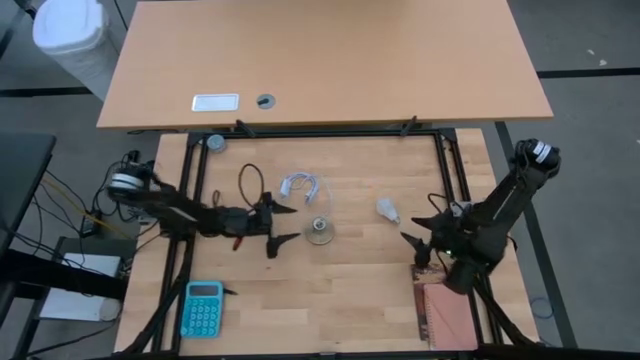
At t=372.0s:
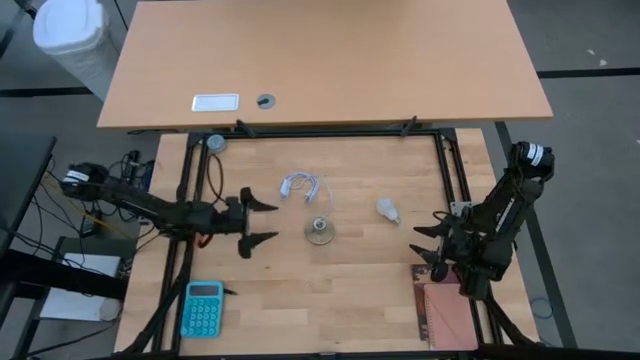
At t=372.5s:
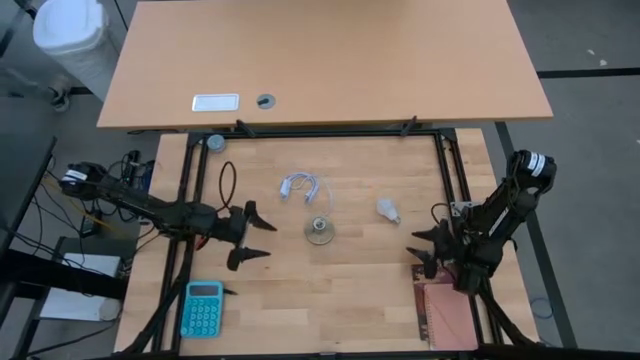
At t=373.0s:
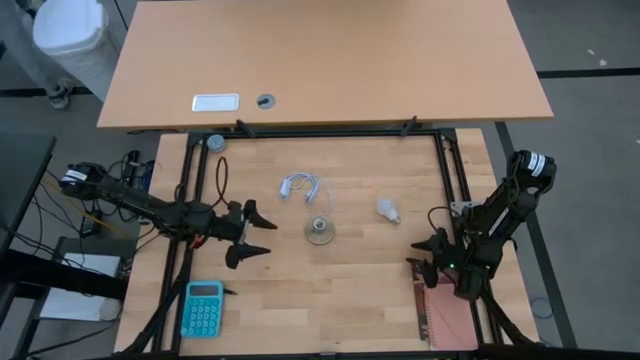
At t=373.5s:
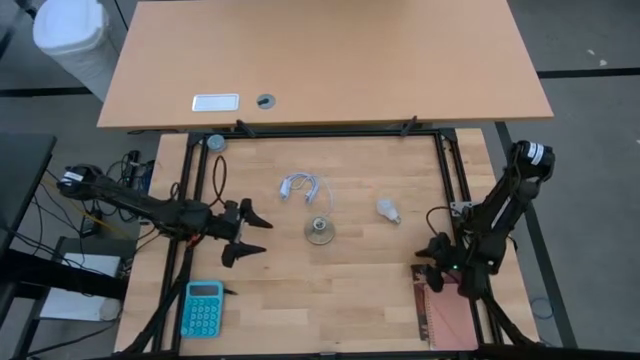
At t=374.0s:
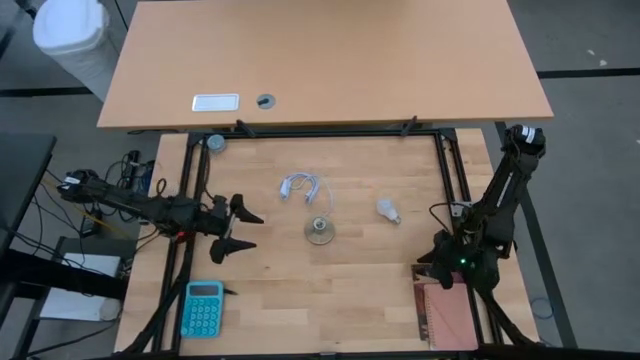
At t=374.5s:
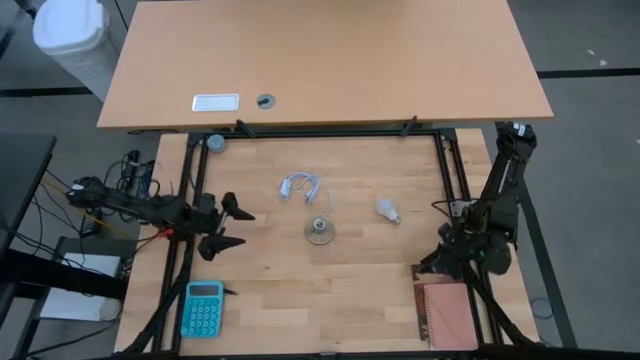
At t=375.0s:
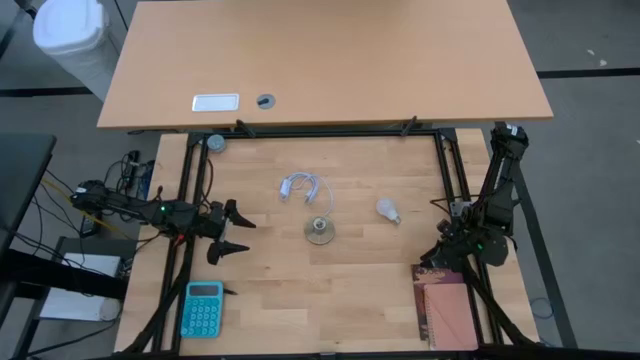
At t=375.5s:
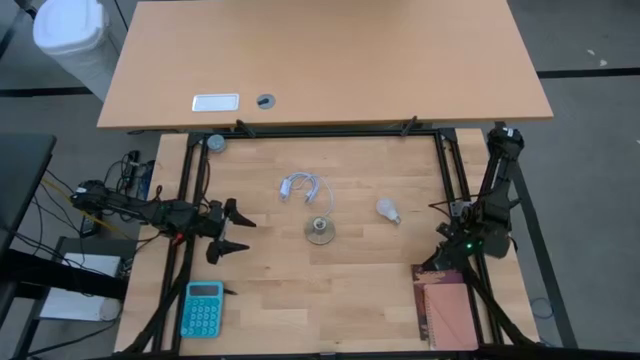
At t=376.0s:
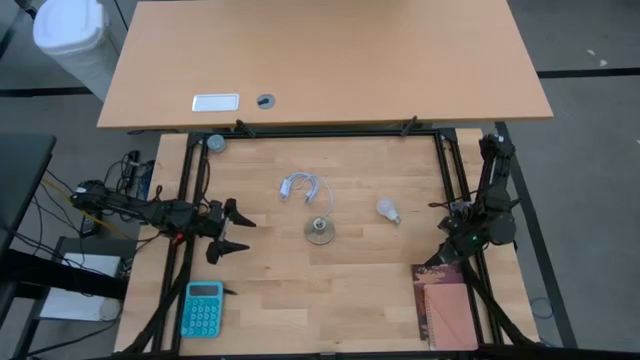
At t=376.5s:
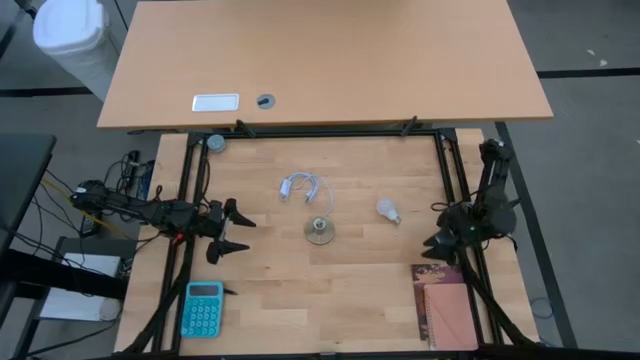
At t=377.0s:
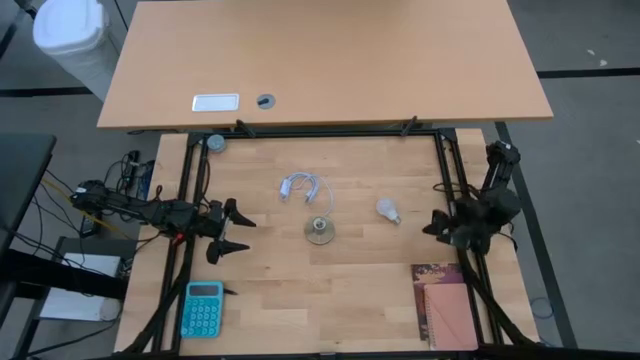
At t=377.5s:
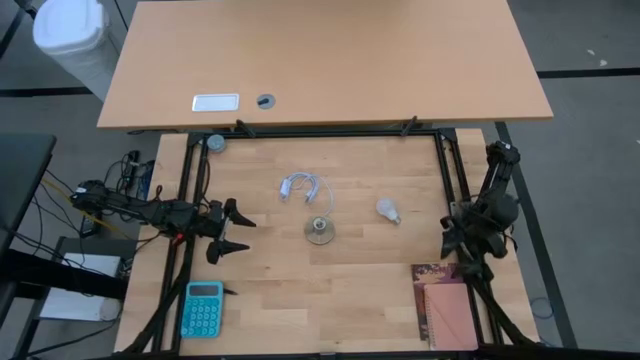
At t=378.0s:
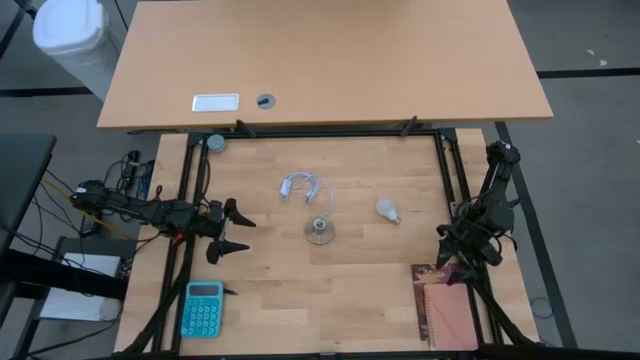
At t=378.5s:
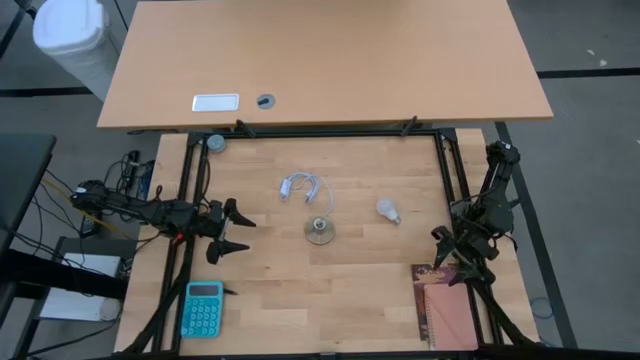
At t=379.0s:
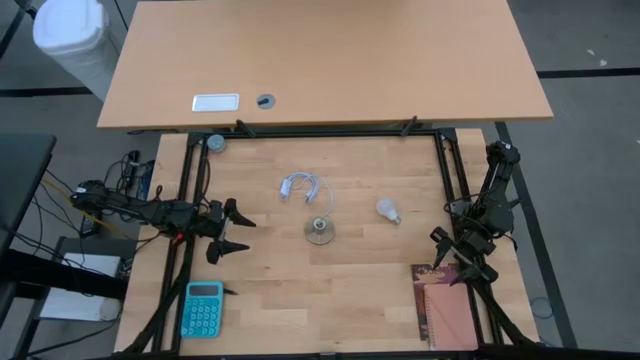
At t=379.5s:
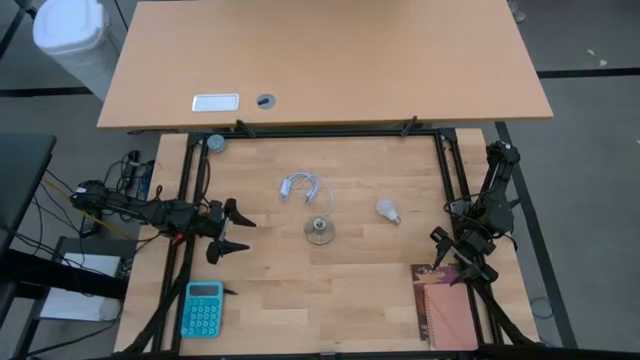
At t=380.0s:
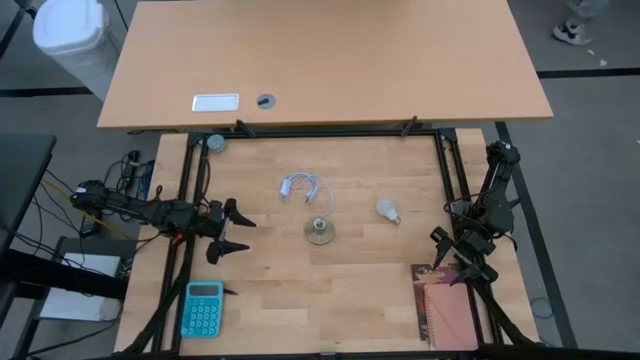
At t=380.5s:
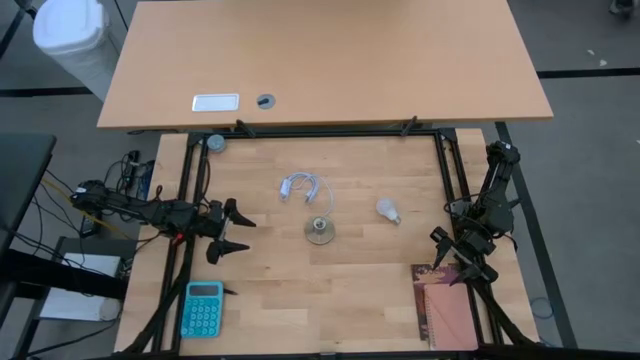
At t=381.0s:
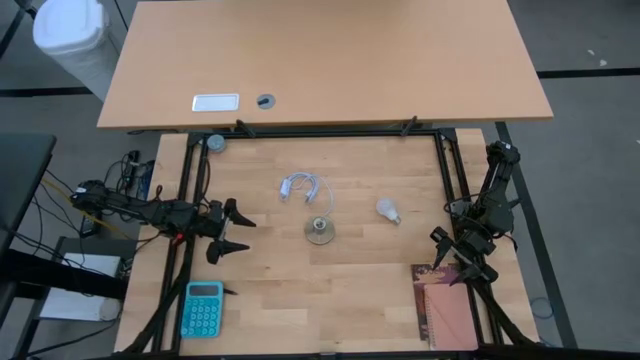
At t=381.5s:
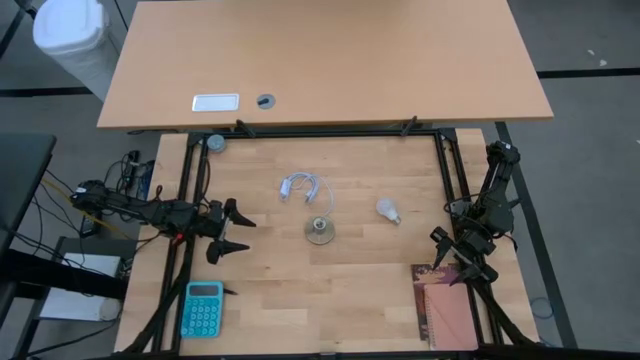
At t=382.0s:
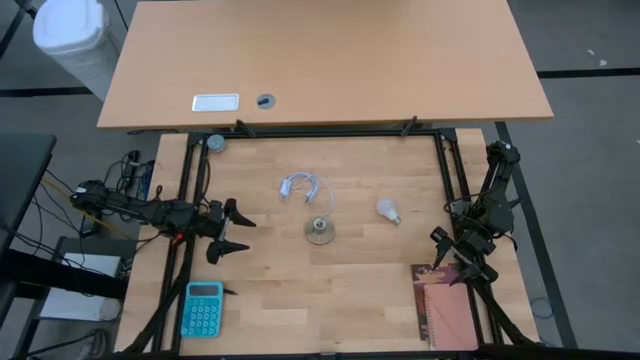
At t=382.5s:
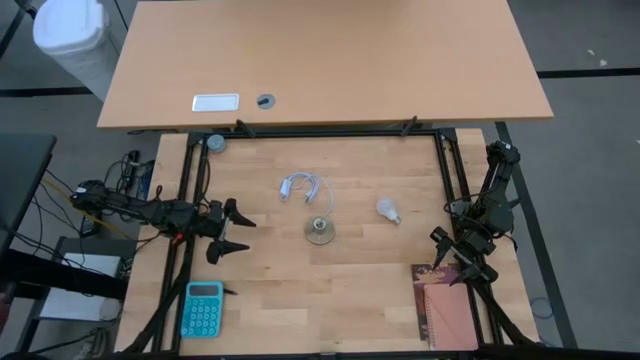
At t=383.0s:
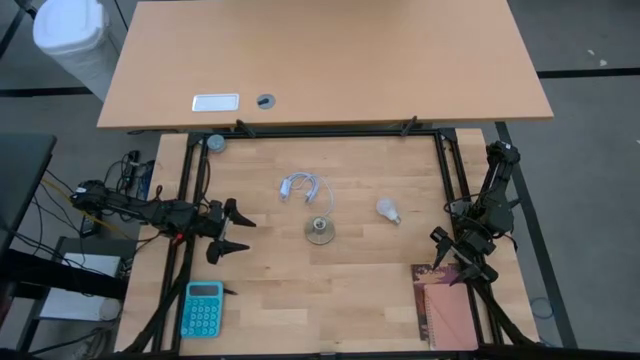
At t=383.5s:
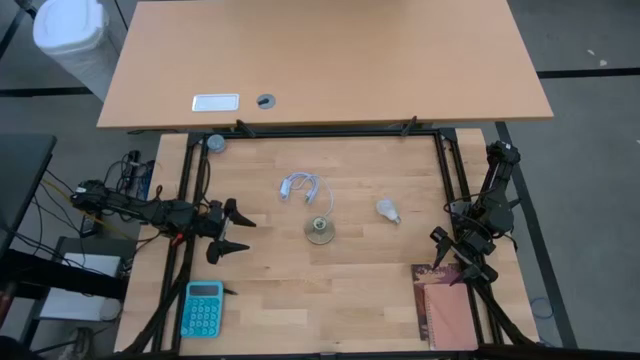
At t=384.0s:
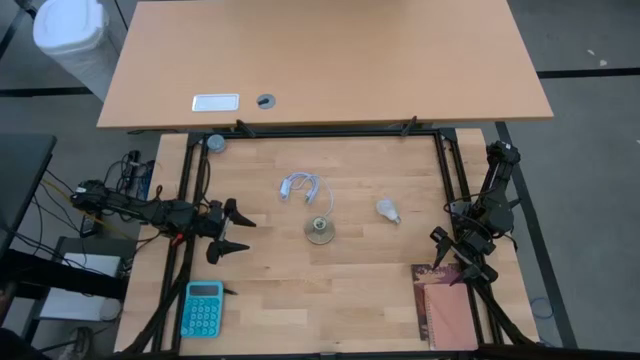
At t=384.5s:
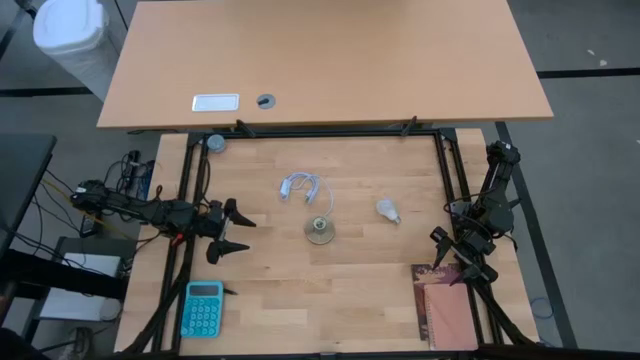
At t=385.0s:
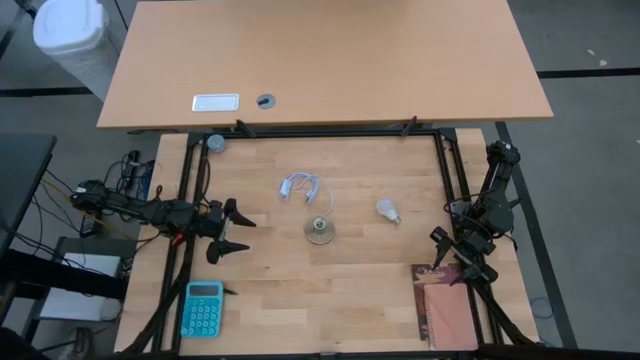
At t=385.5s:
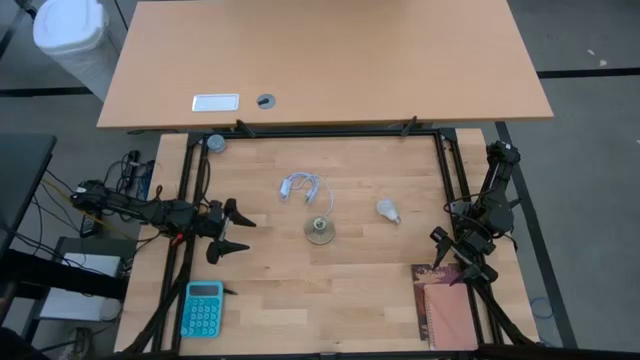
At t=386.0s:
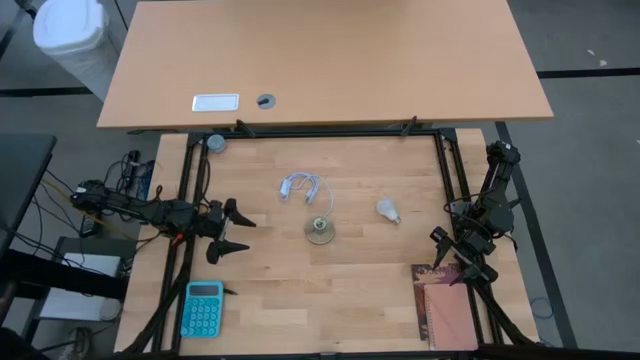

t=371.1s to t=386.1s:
Task: Screw lightbulb
Return to Home Position

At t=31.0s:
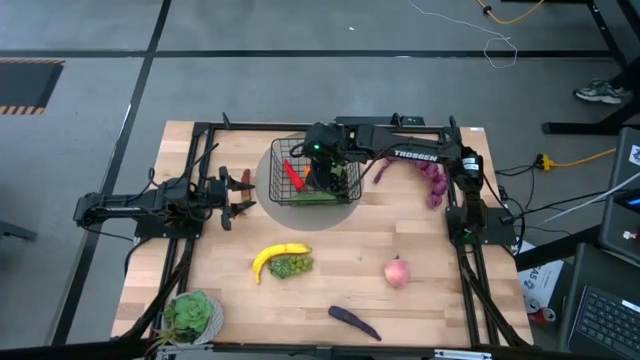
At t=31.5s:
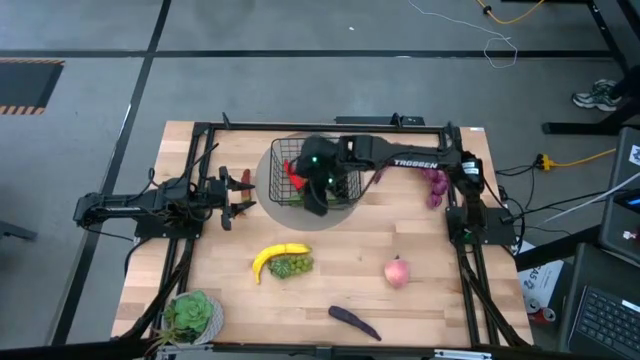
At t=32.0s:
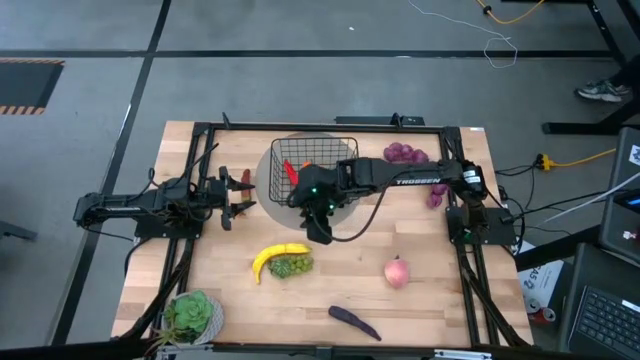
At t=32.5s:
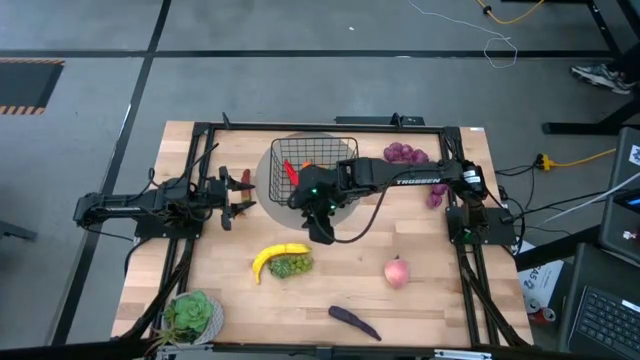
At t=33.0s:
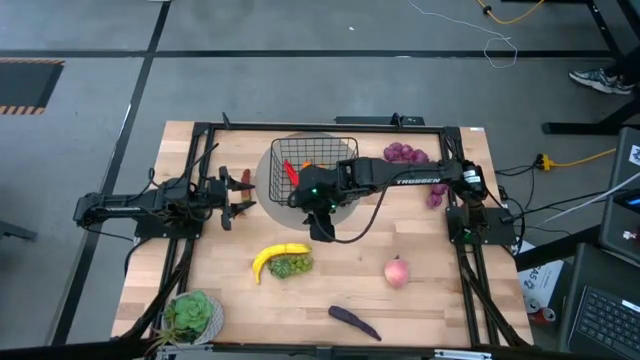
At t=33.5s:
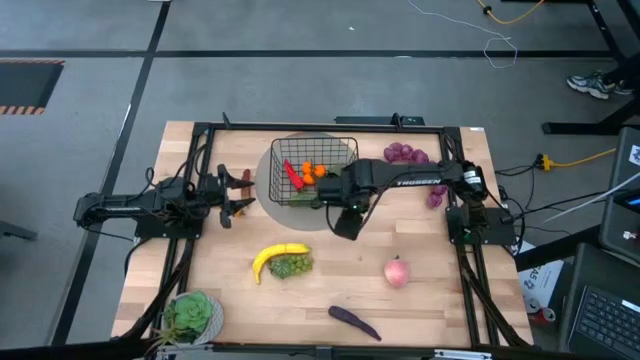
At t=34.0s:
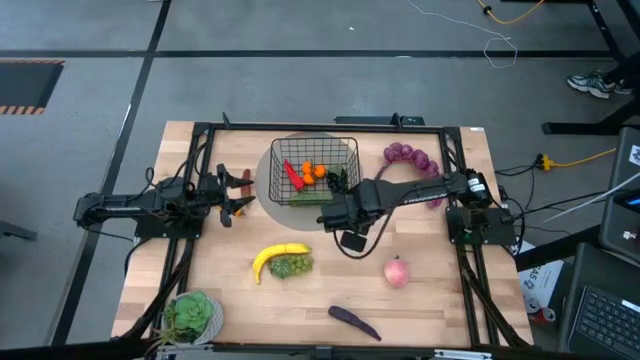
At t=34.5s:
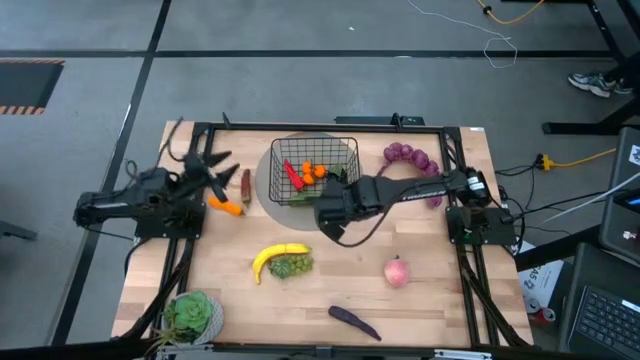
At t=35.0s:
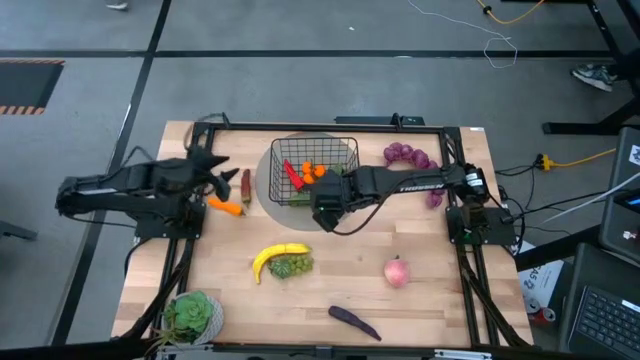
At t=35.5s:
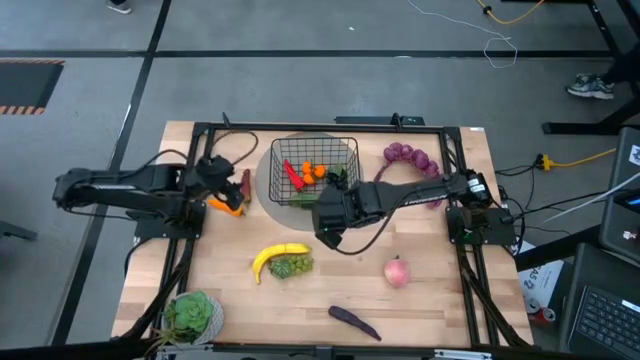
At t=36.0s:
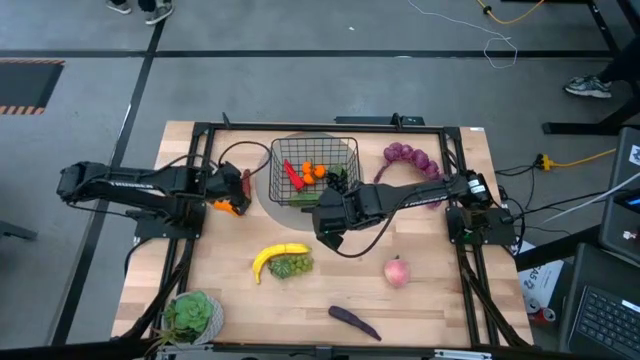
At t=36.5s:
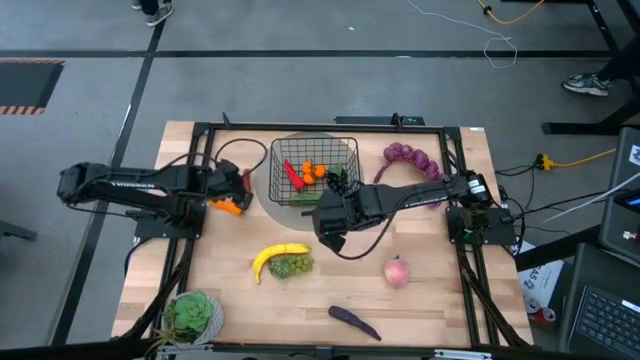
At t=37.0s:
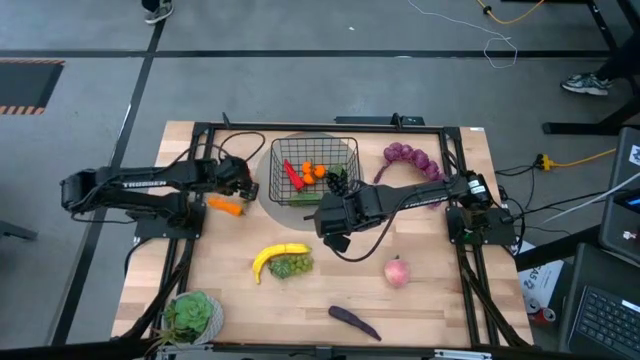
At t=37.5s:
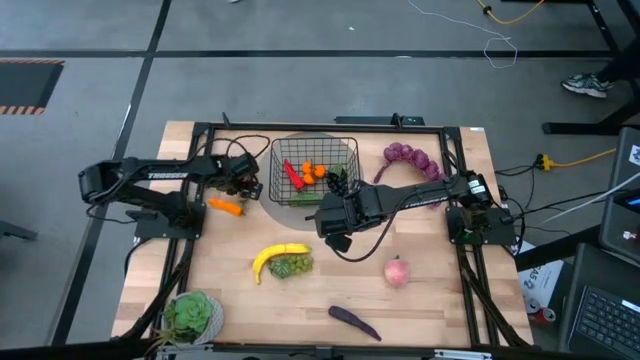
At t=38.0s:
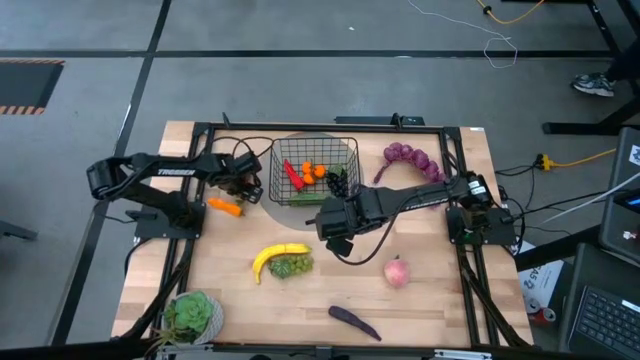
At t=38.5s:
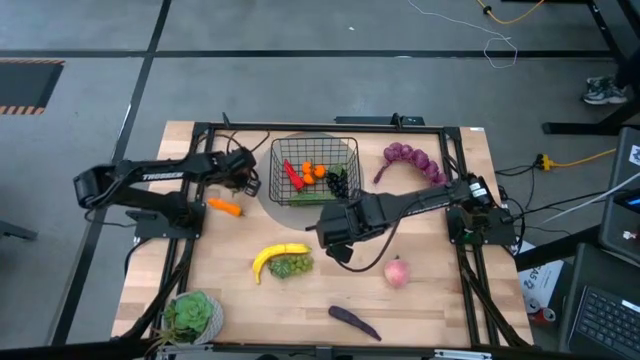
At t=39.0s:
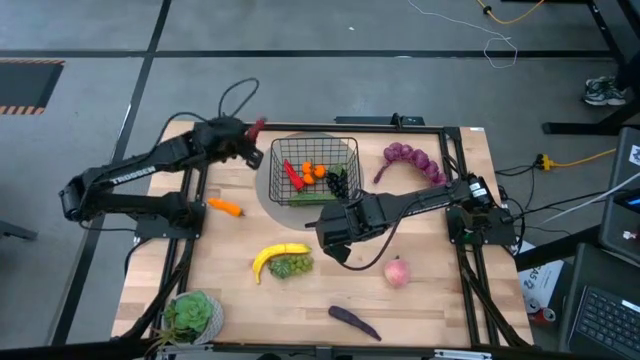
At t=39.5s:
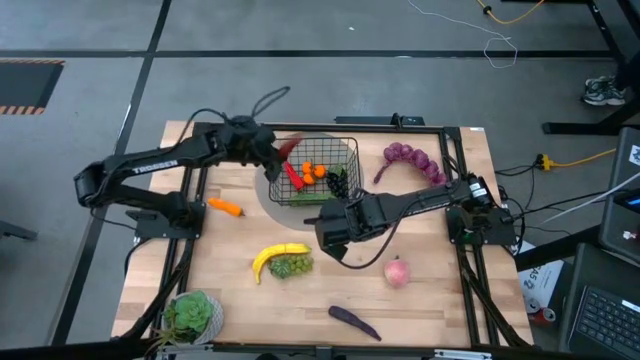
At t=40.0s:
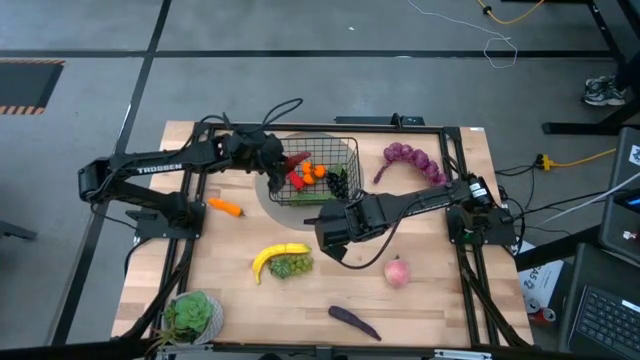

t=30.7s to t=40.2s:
Task: Build produce basket
Put the dark red chili pepper into the wire basket
